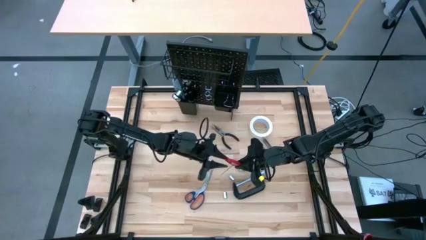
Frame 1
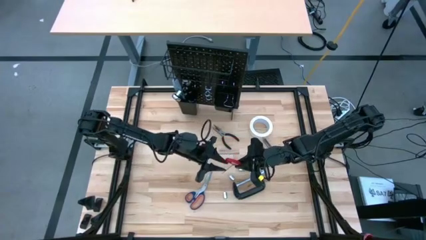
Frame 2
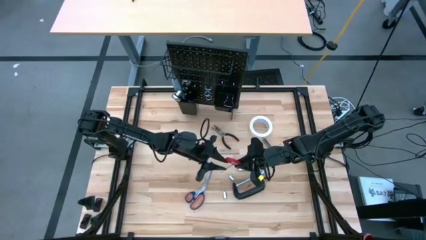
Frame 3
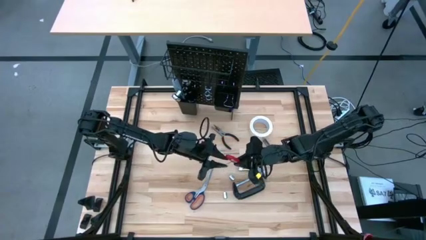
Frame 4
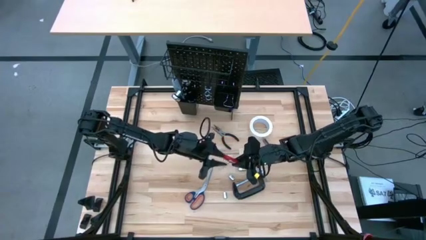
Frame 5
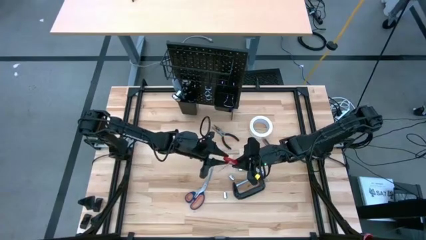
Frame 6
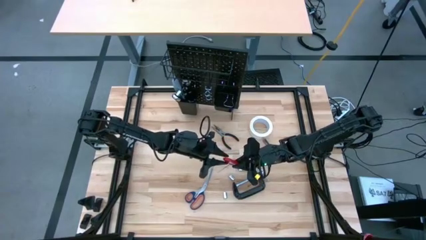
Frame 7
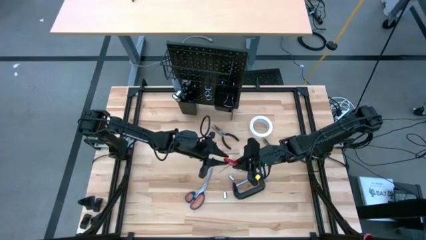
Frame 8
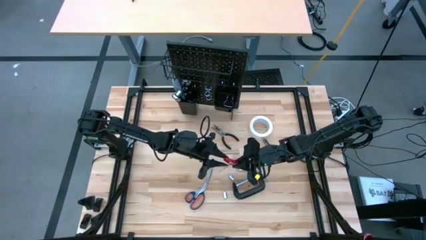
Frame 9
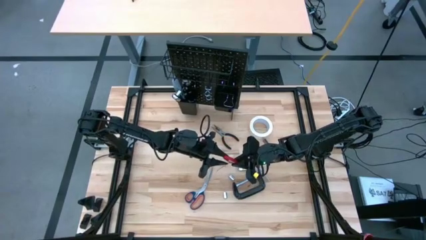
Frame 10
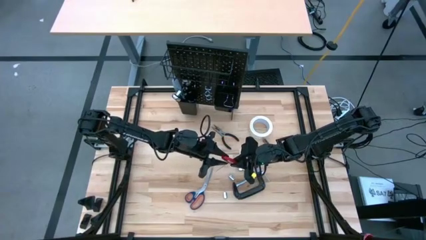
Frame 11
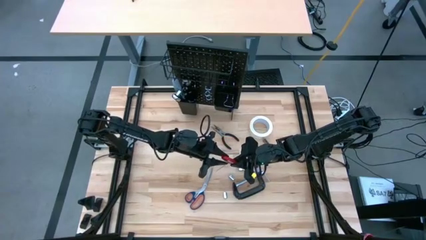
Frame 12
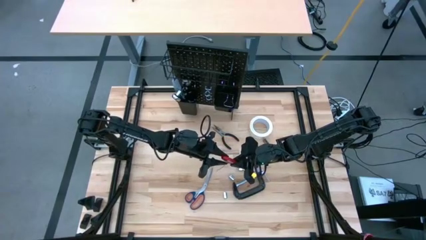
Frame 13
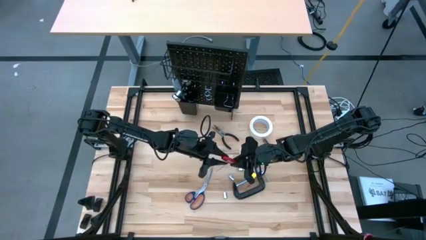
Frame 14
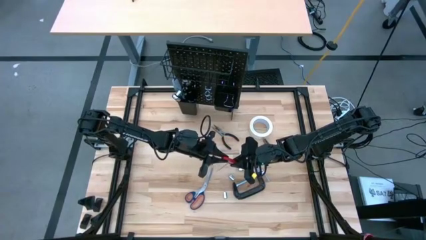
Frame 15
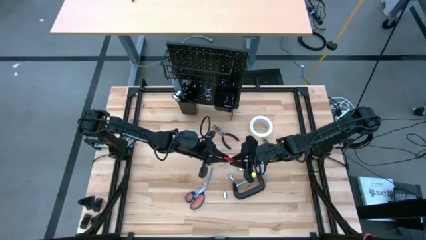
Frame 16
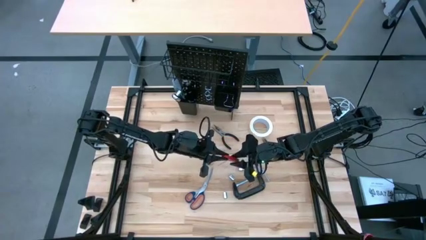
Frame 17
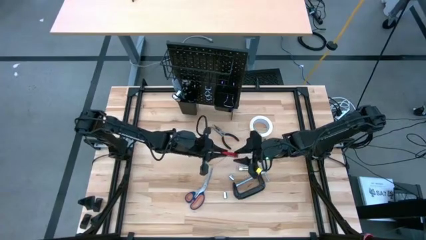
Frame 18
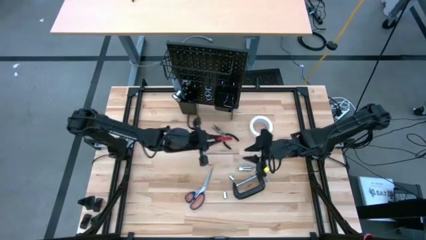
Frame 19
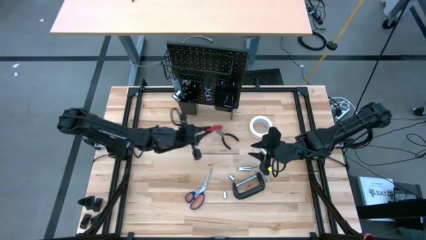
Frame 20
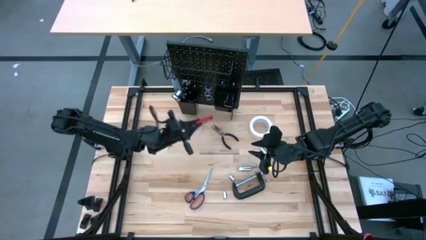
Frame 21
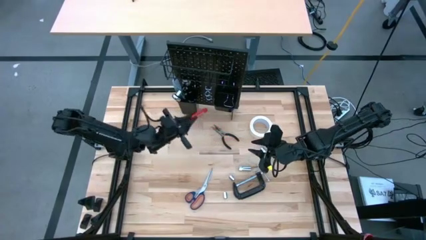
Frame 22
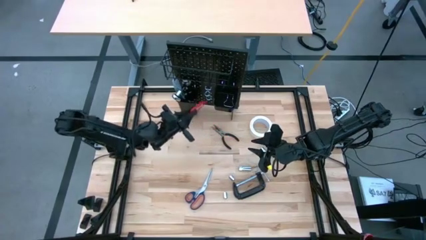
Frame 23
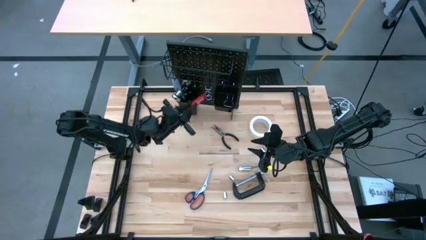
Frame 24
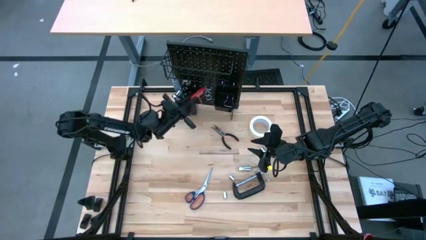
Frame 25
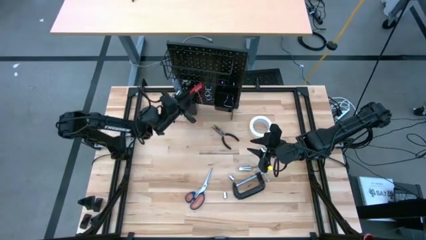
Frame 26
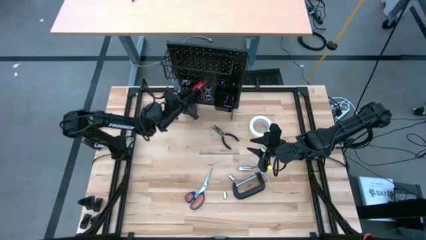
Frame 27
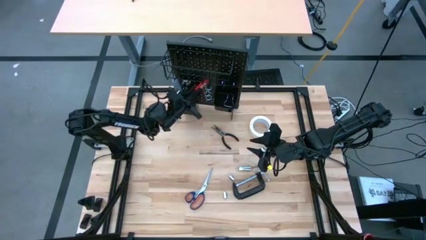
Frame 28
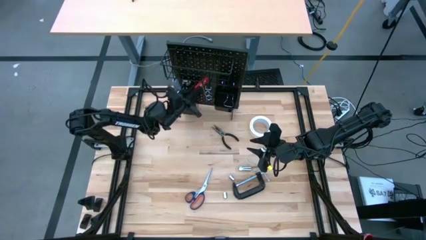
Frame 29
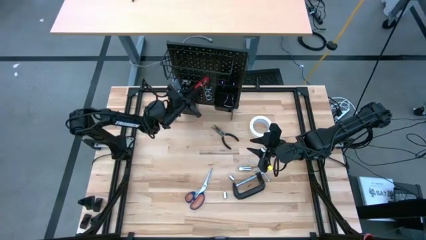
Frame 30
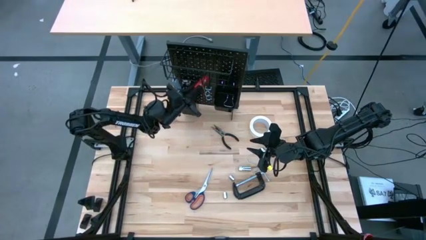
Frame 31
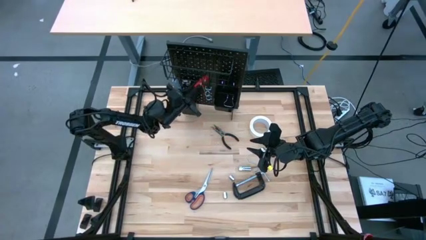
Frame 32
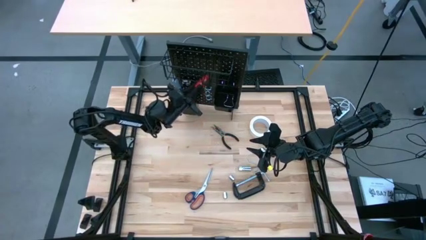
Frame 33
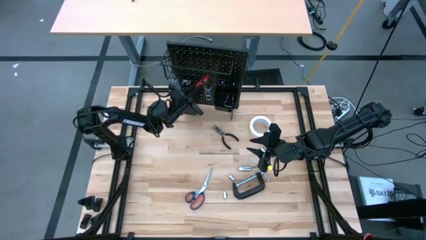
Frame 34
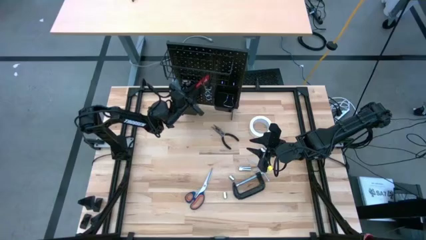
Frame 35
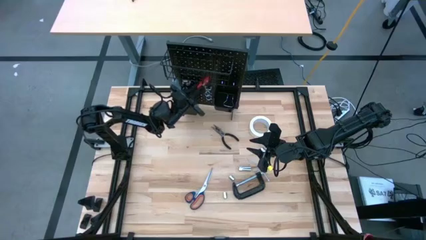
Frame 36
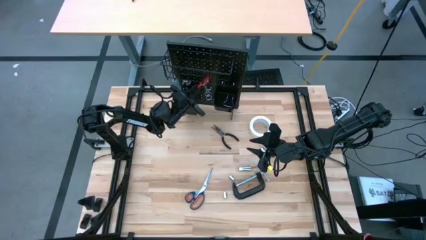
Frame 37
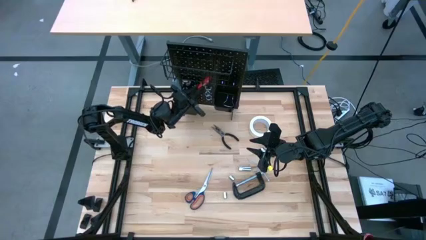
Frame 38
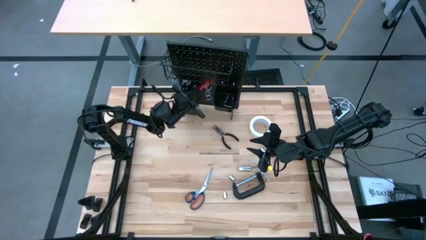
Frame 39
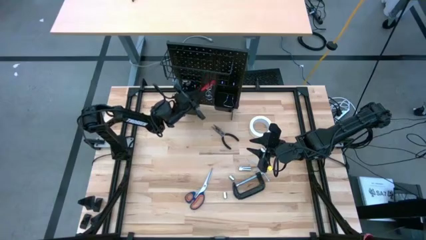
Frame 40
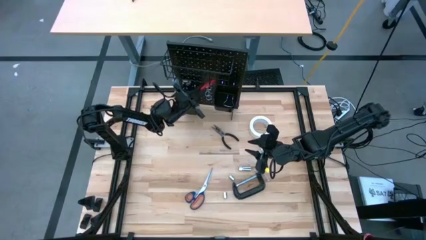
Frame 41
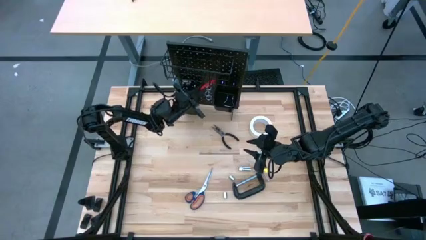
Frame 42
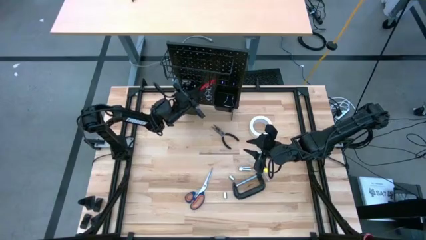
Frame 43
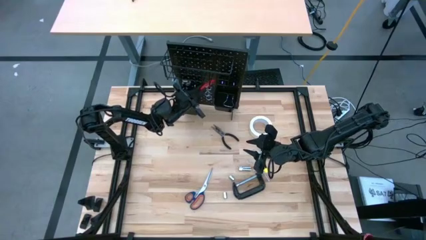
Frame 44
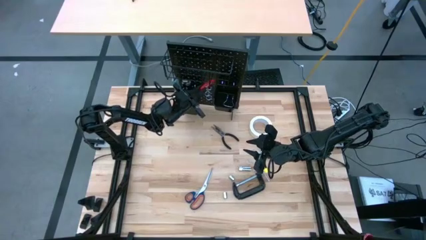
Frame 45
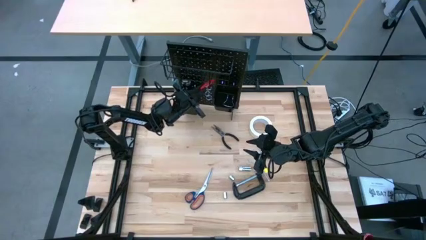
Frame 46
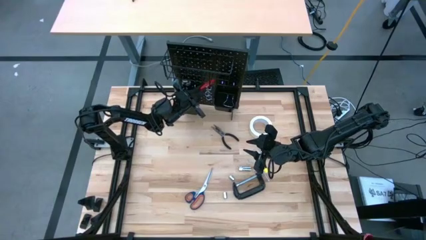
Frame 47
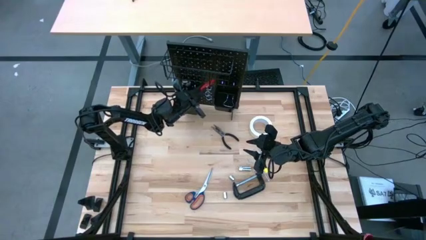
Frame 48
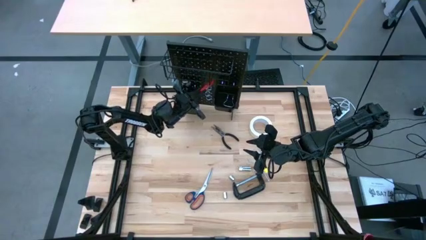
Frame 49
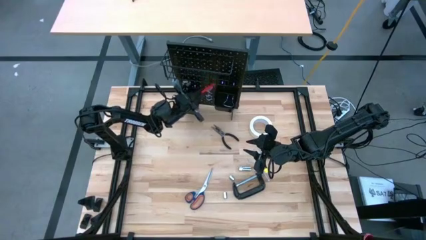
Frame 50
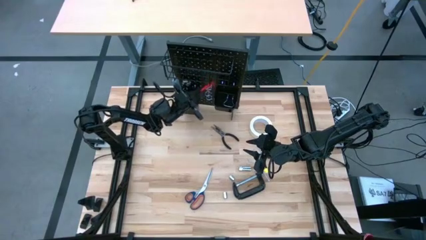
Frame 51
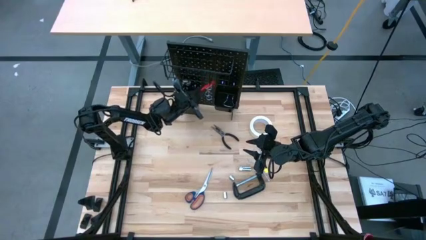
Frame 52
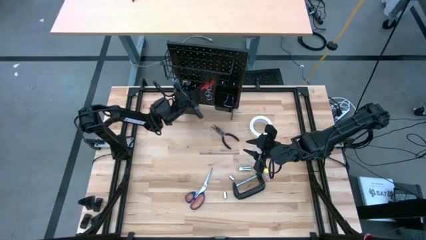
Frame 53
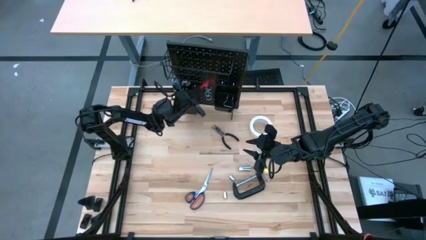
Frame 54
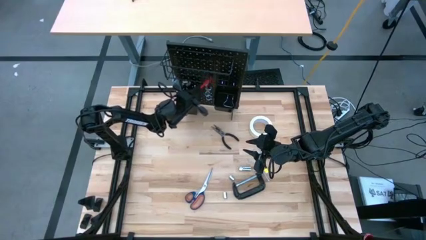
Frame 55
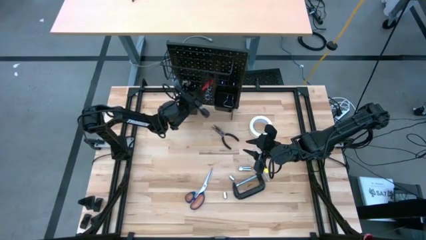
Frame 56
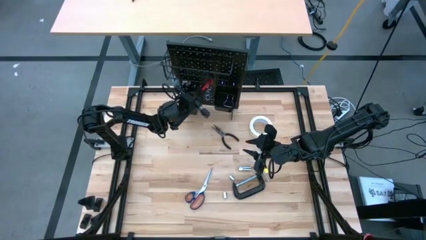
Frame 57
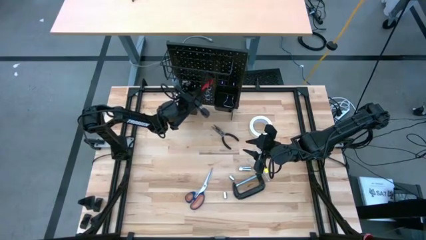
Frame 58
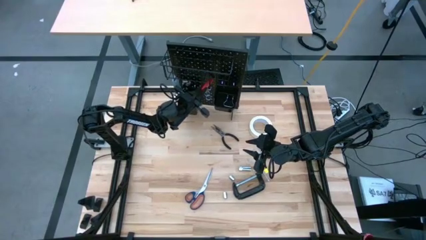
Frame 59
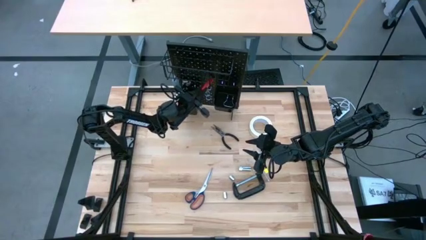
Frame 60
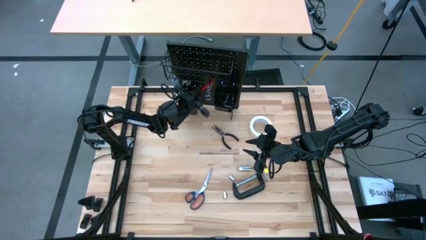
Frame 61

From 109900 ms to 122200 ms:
Task: Hang tools onto peg board
Hang the red allen wrench on the peg board
